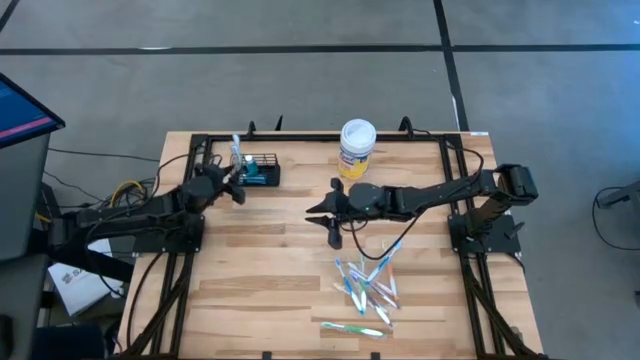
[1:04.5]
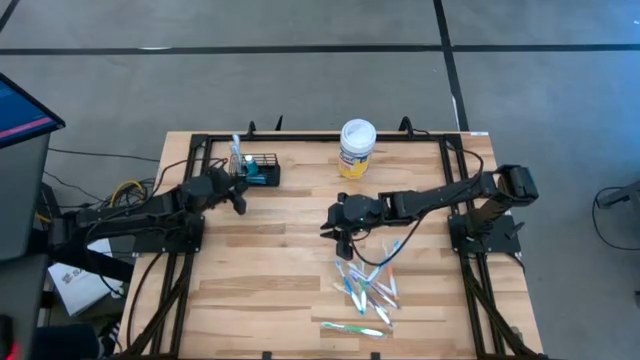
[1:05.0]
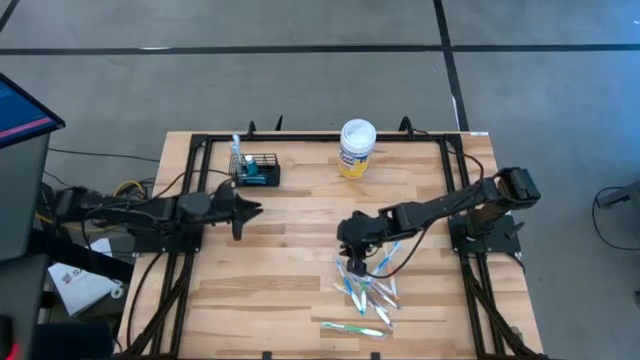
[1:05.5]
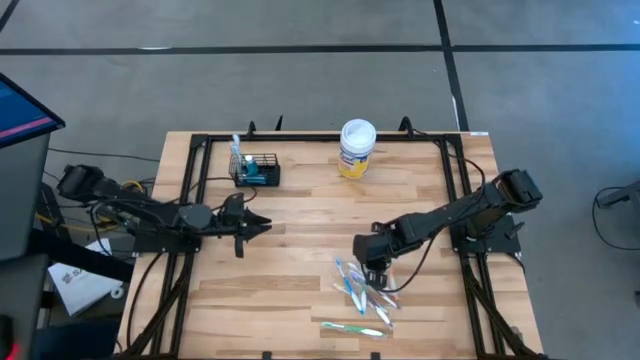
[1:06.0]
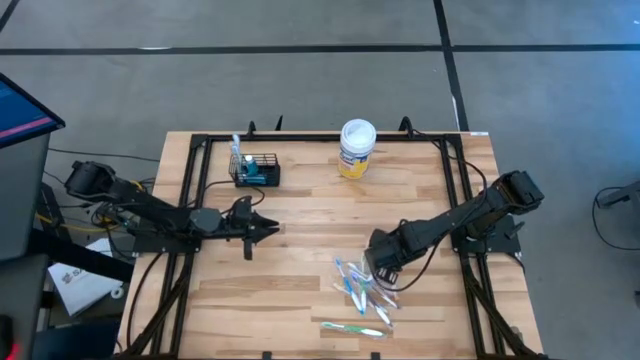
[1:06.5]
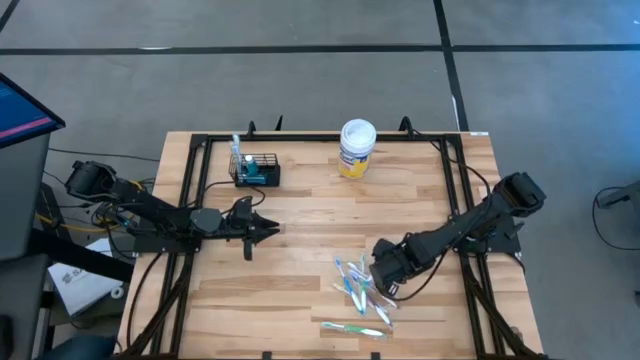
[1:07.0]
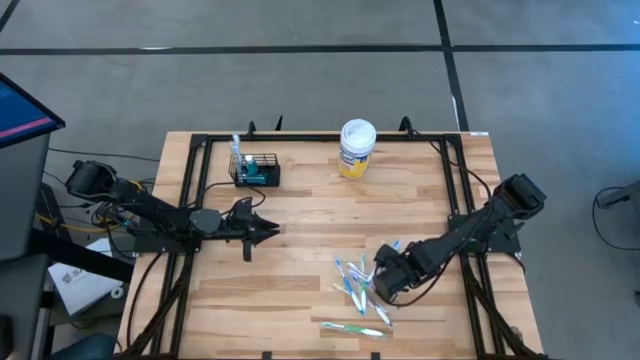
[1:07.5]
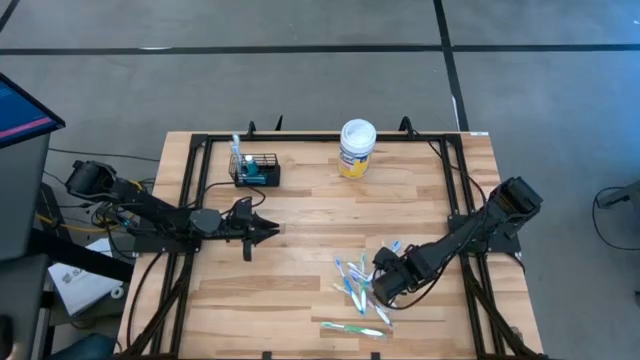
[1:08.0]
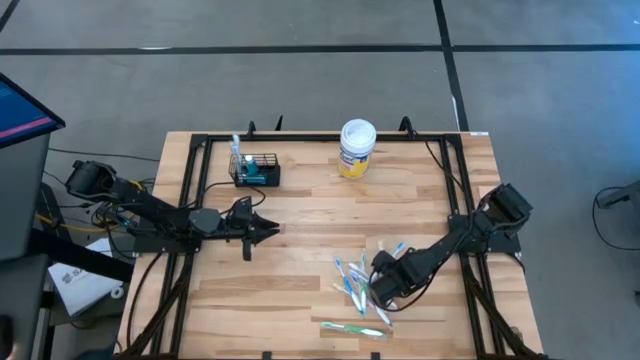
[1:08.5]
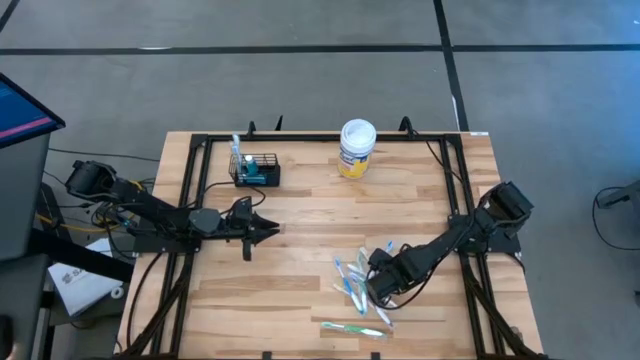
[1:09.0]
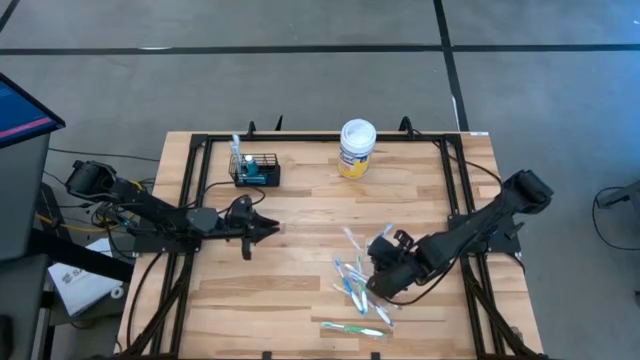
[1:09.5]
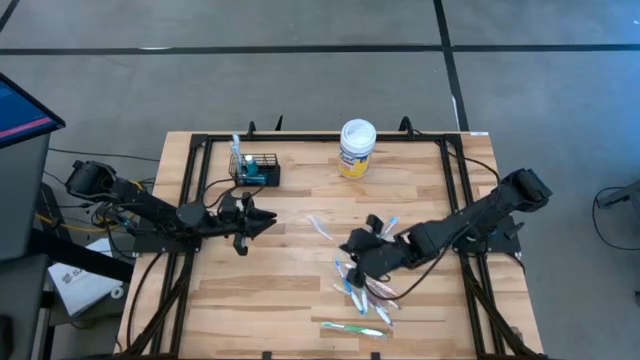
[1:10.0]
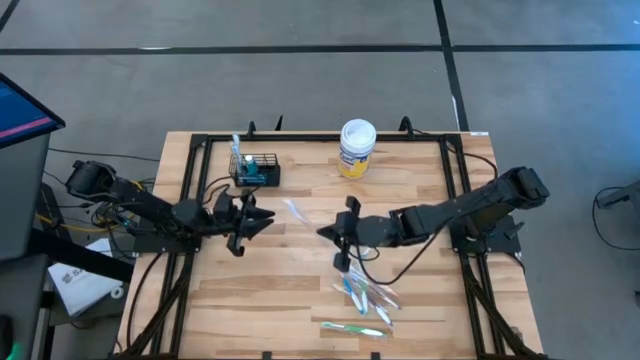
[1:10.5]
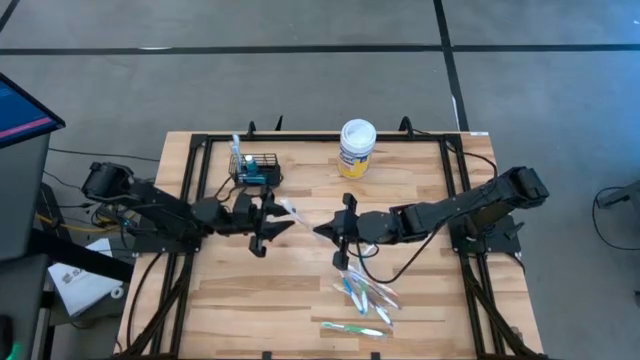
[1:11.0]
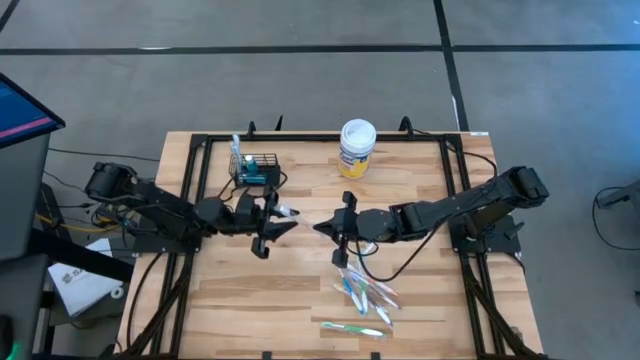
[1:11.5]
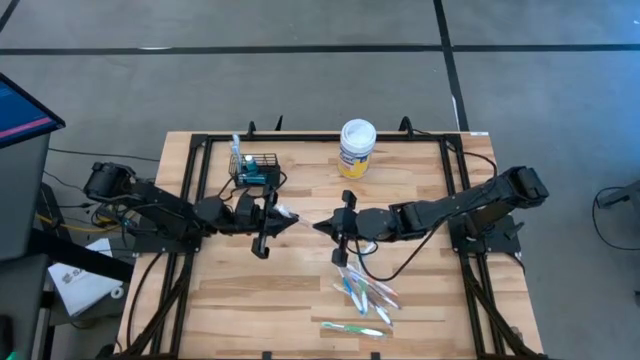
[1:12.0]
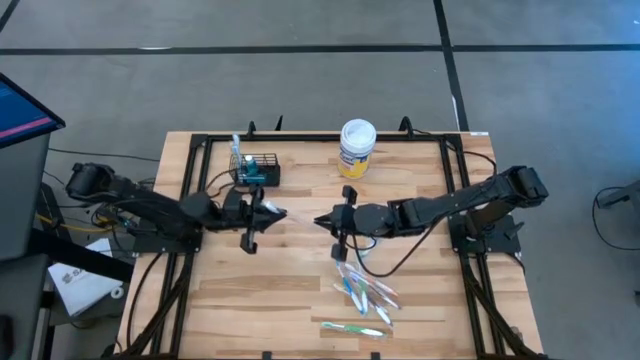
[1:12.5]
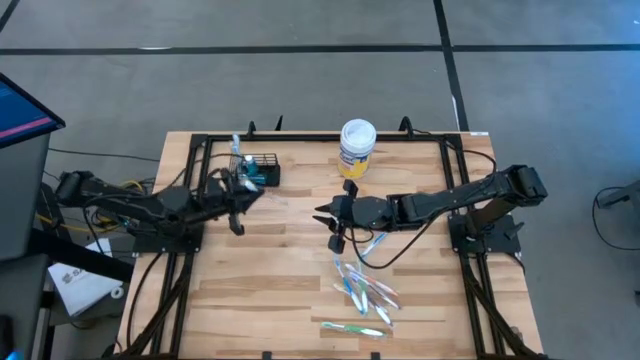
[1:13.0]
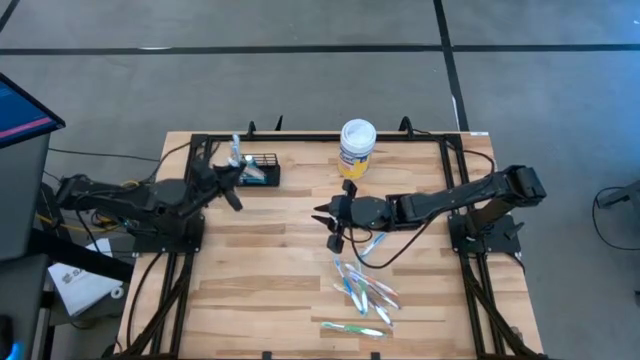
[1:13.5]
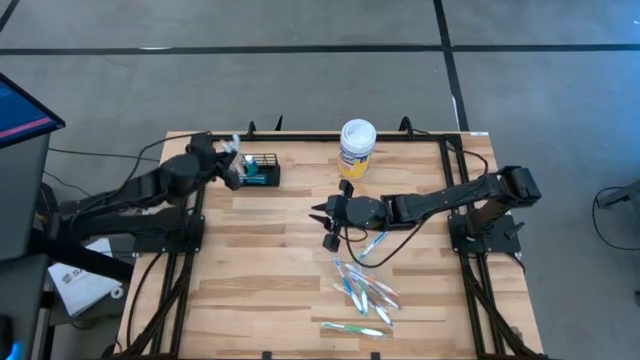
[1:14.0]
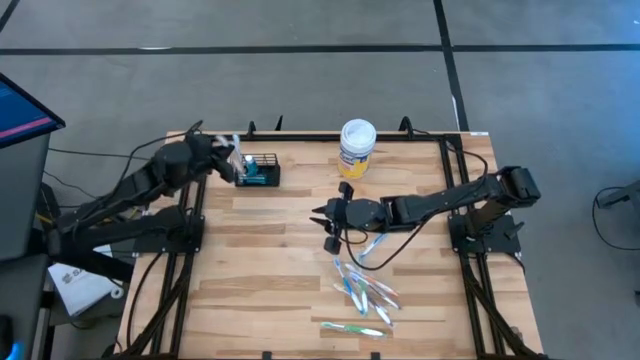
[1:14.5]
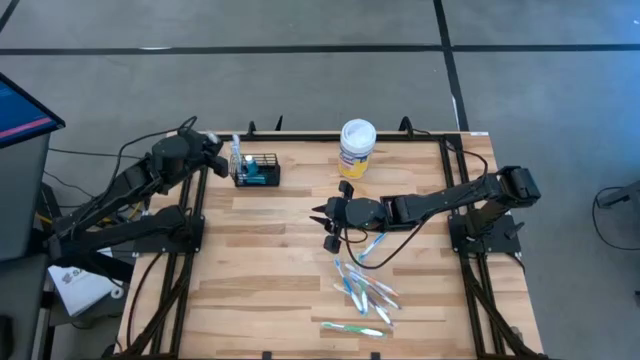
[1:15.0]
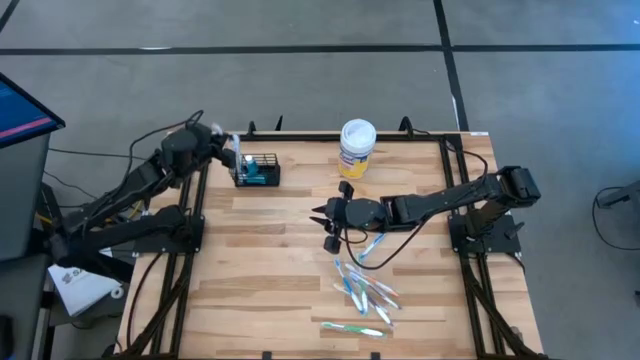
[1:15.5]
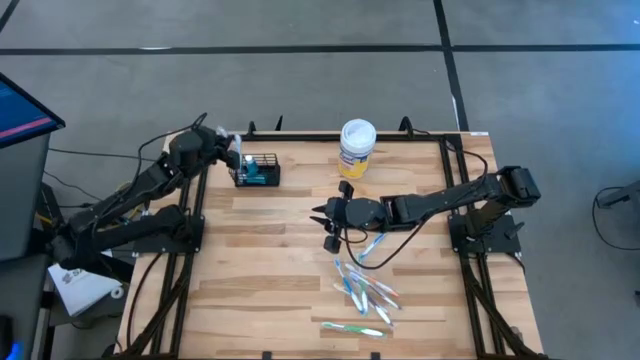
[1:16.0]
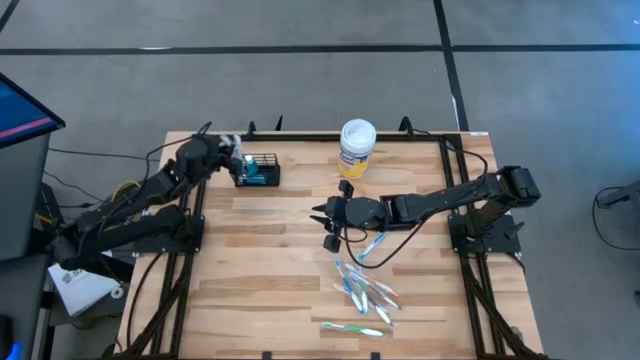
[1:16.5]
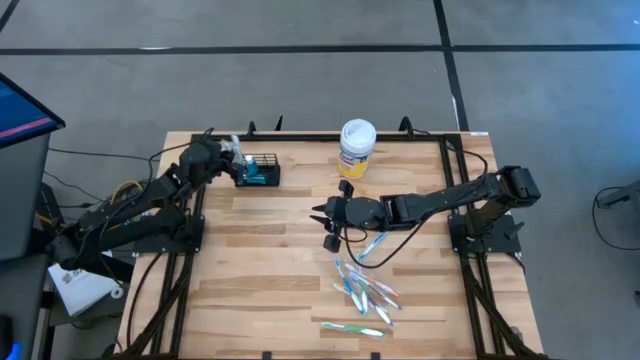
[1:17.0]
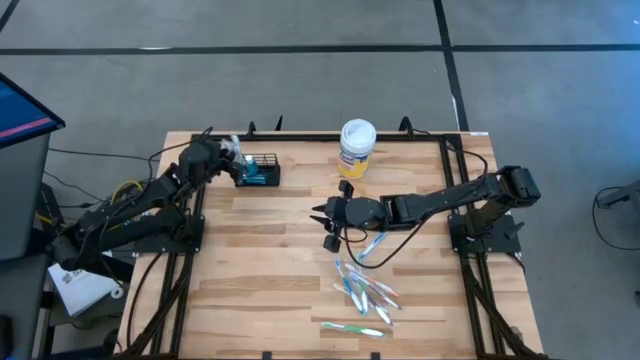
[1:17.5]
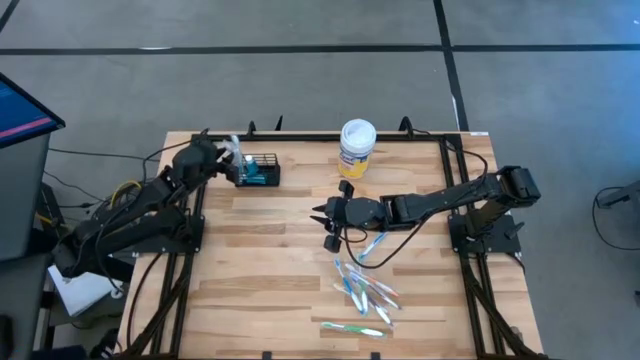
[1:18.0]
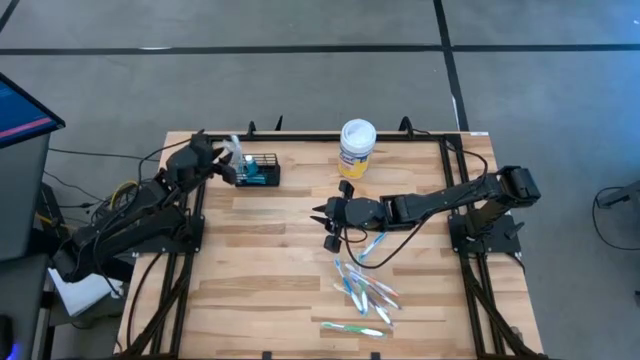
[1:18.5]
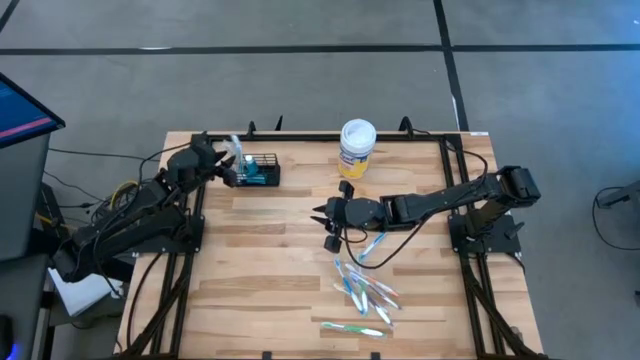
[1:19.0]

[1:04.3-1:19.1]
Task: Pick & Place toothbrushing station
Put the right orange toothbrush into the mesh organizer

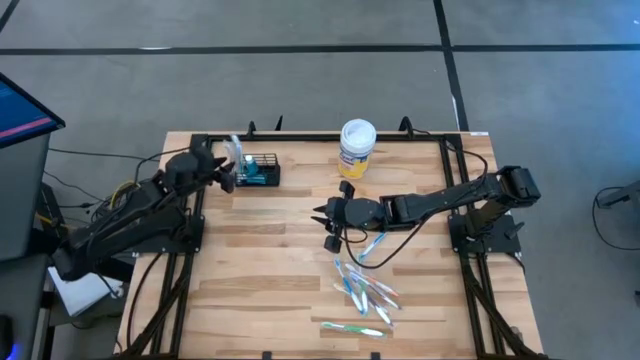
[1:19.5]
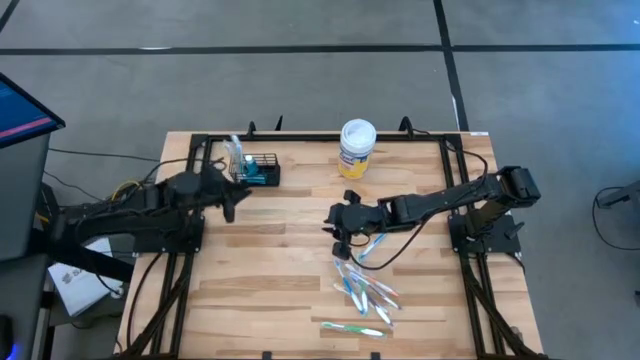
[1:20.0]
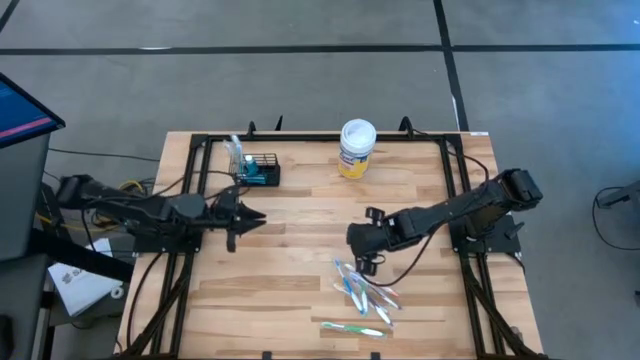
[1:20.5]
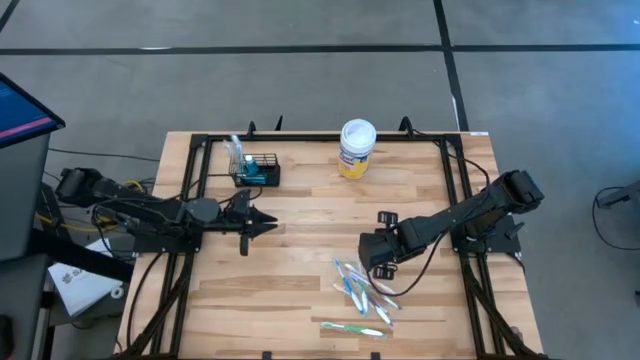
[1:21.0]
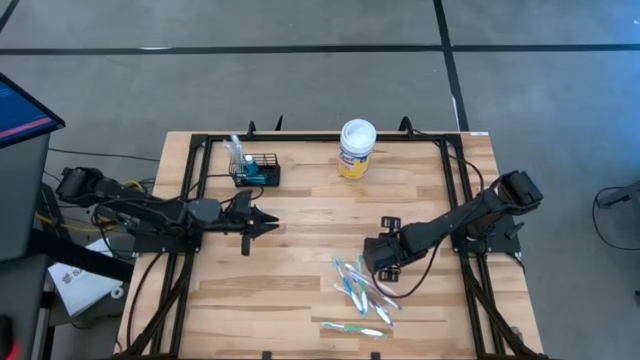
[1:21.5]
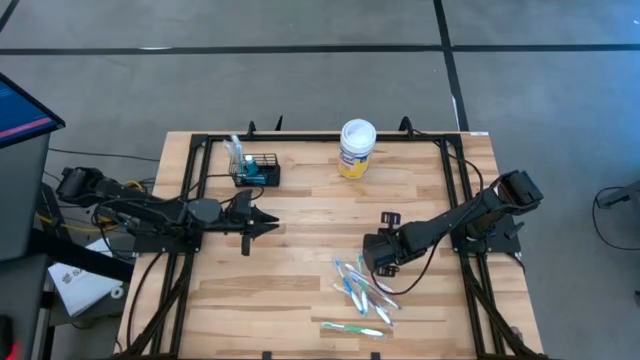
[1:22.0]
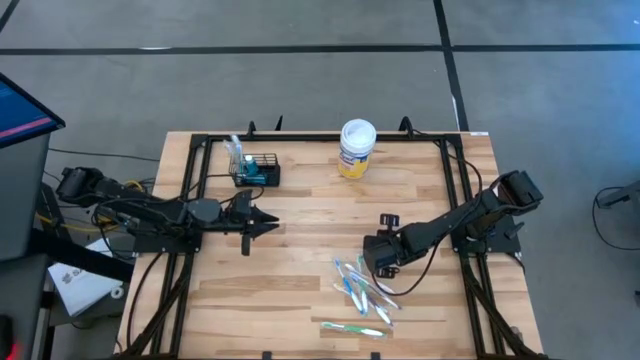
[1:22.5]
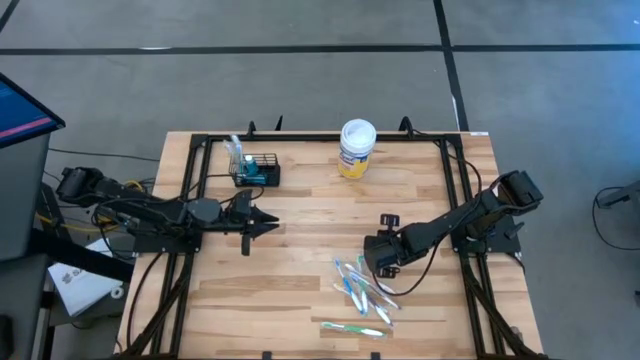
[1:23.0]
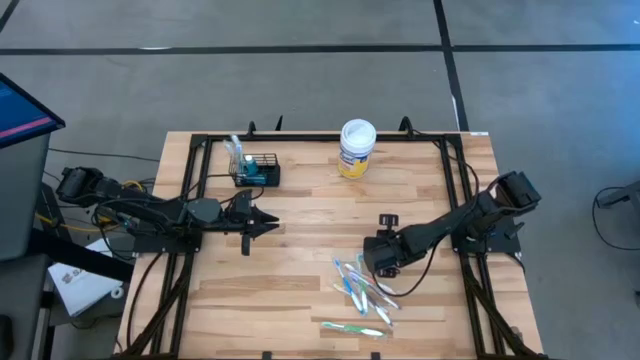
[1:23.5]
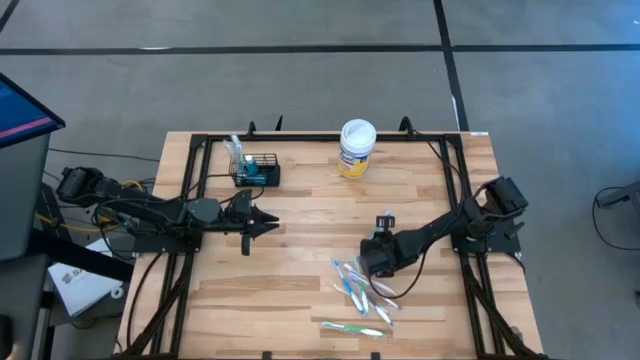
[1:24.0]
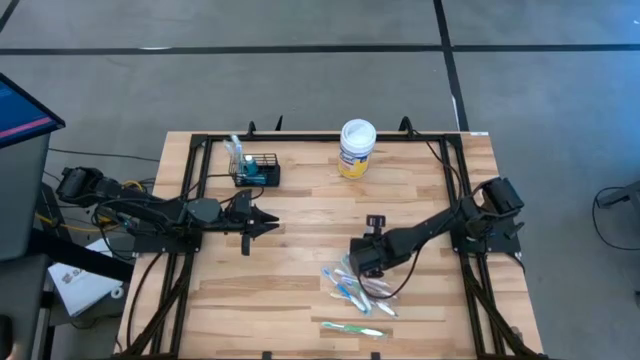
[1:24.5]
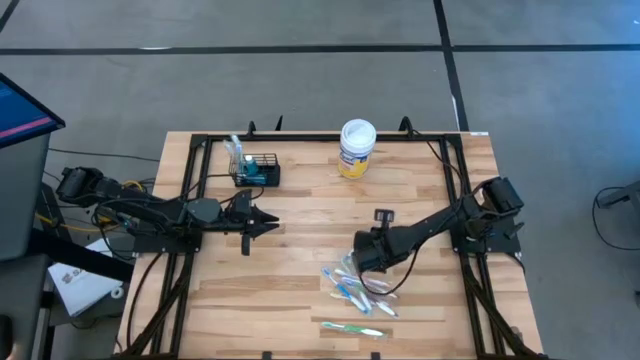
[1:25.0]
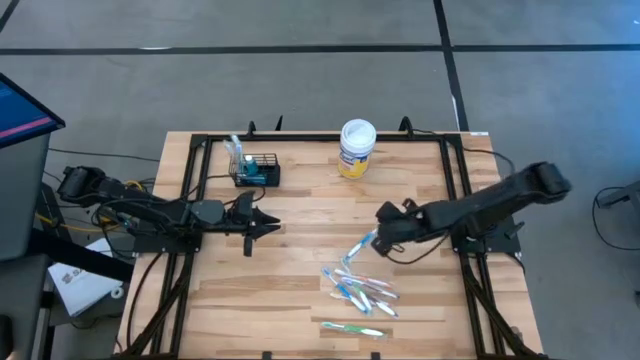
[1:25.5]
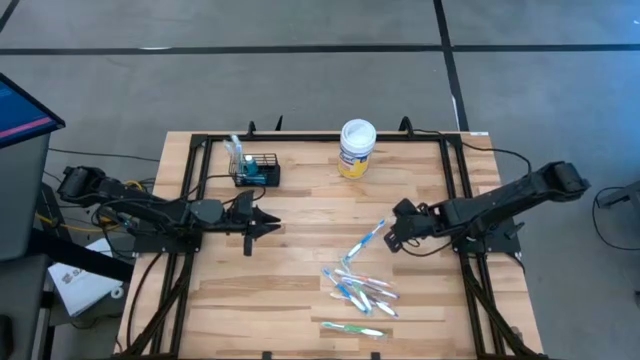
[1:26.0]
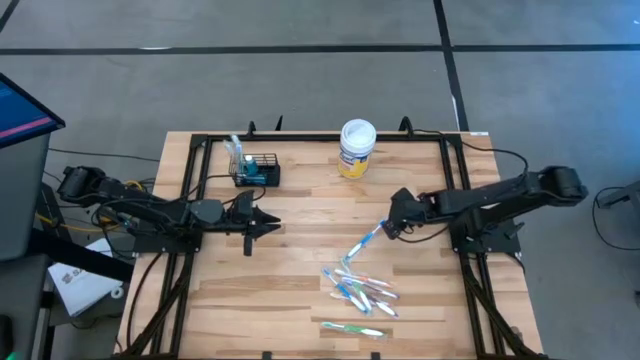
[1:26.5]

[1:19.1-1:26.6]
Put the top blue toothbrush into the mesh organizer
